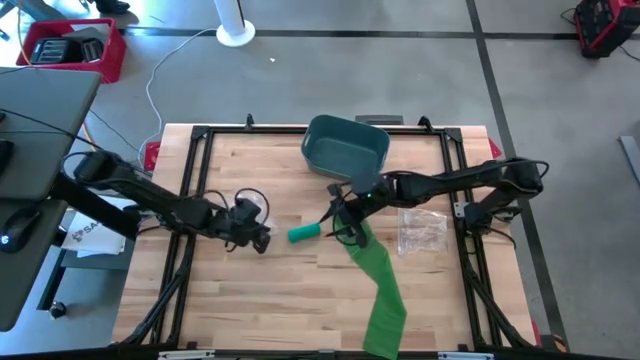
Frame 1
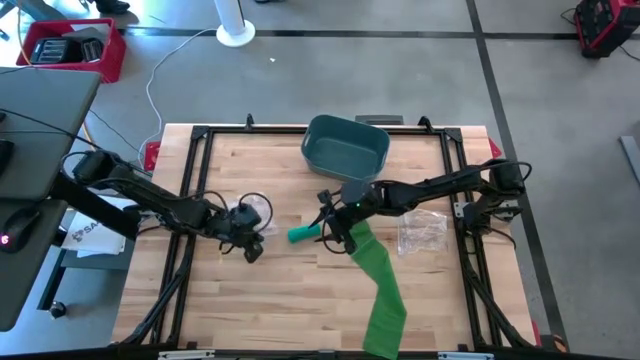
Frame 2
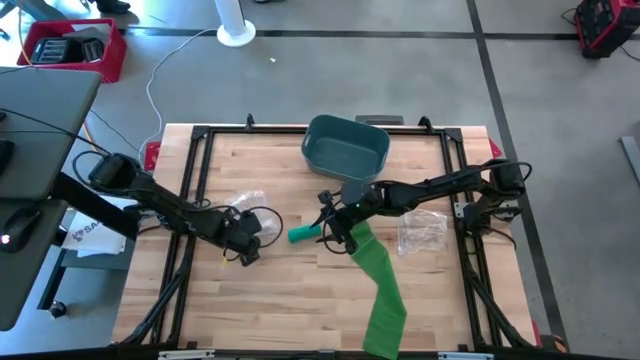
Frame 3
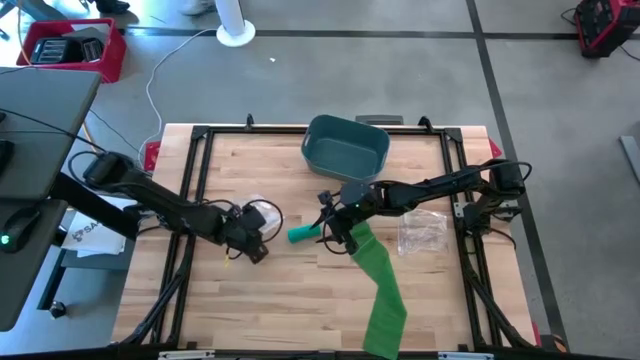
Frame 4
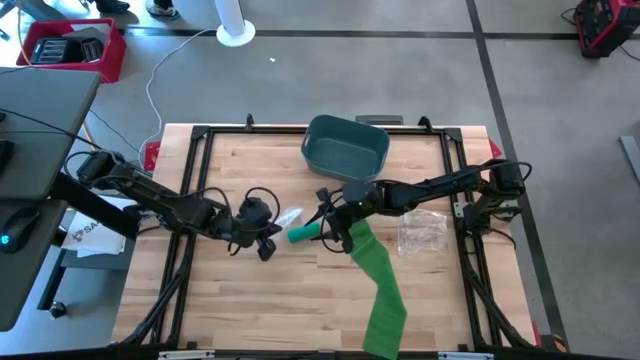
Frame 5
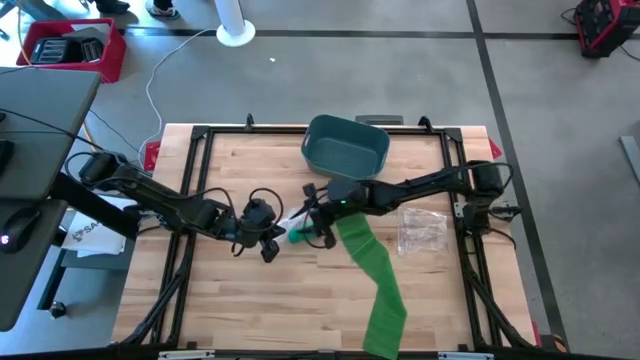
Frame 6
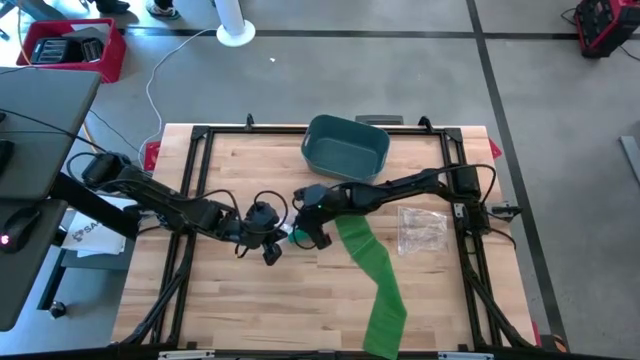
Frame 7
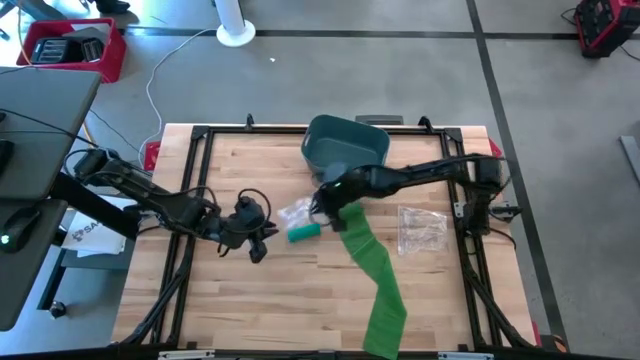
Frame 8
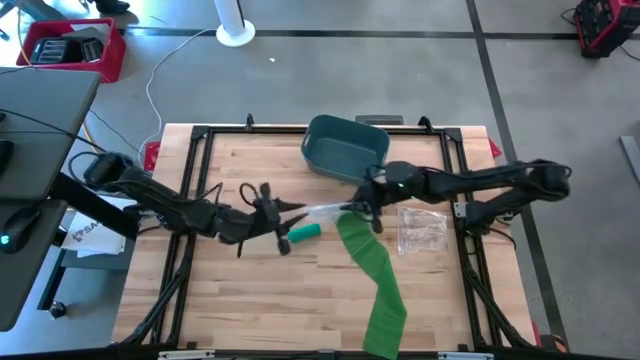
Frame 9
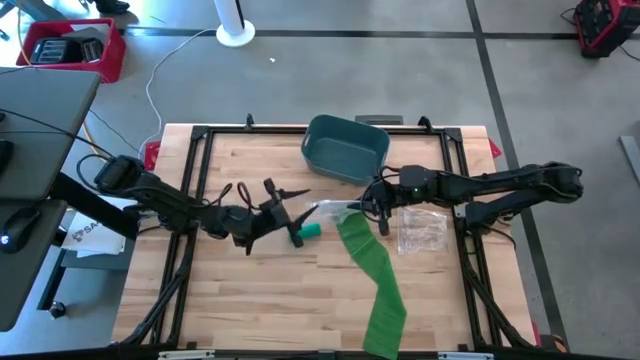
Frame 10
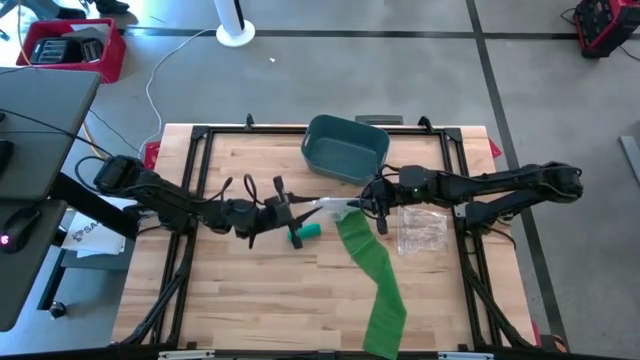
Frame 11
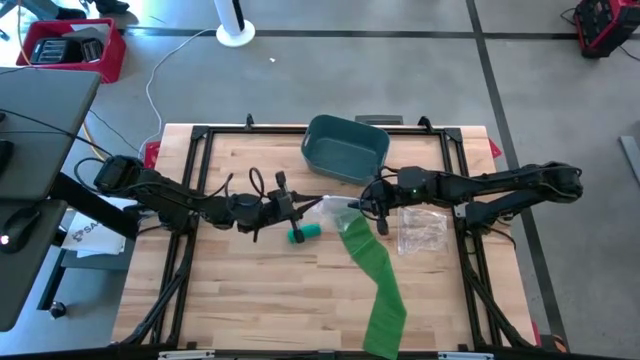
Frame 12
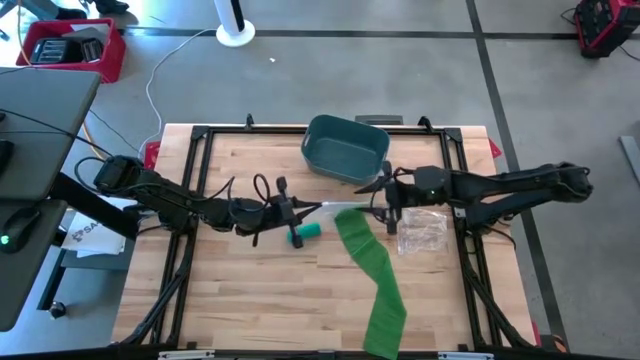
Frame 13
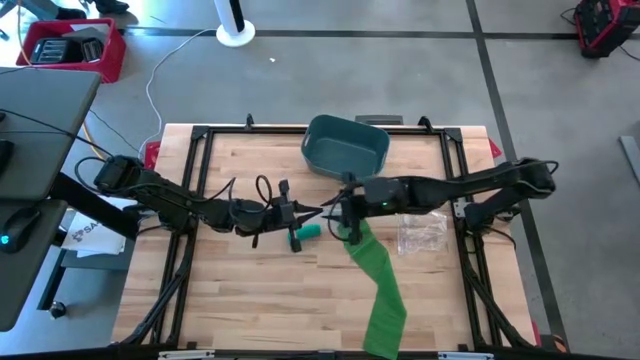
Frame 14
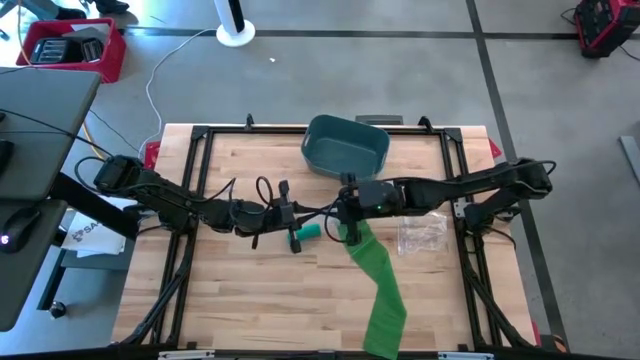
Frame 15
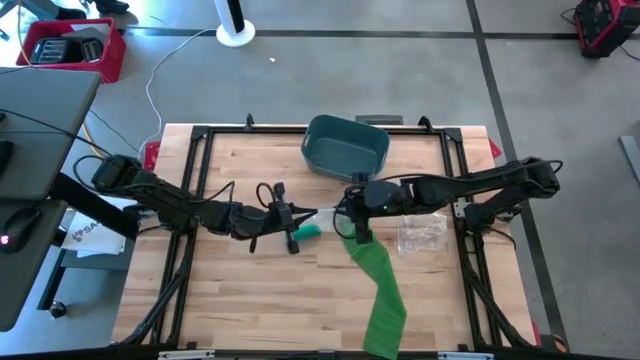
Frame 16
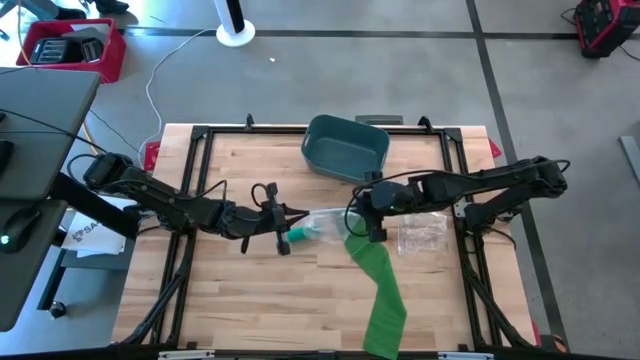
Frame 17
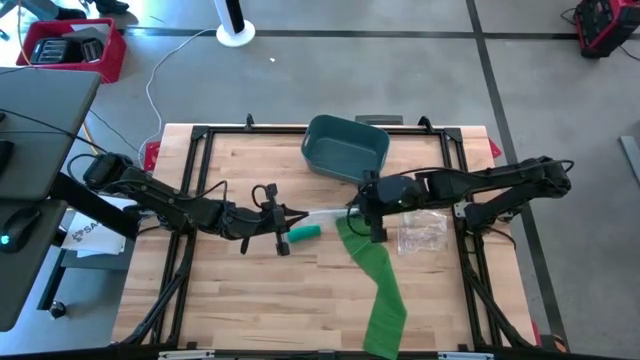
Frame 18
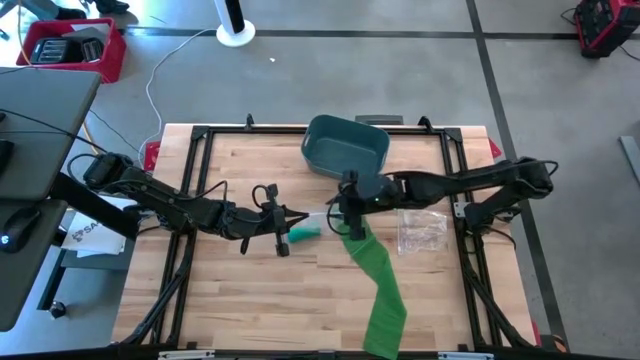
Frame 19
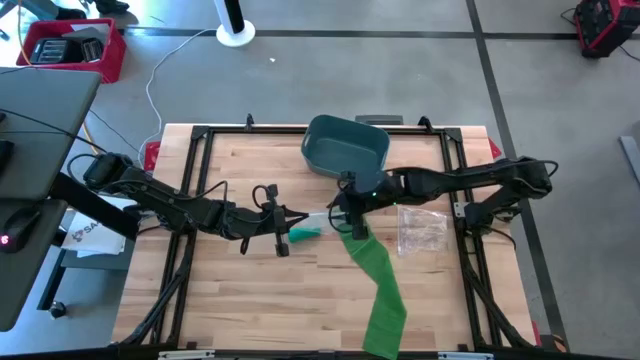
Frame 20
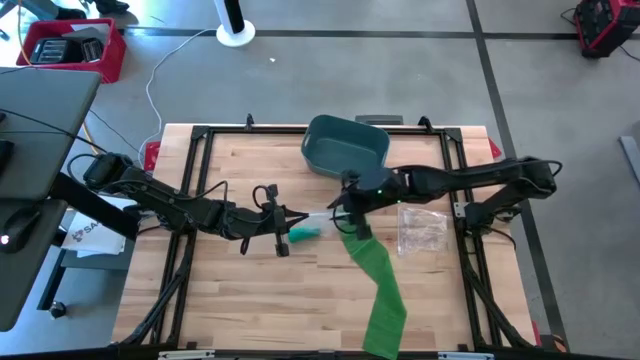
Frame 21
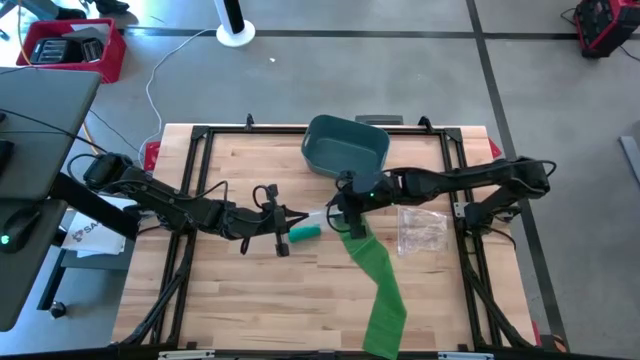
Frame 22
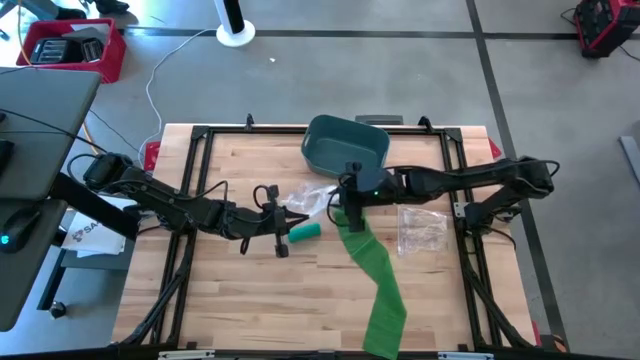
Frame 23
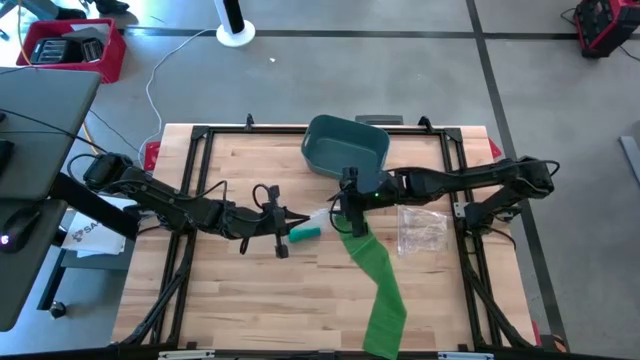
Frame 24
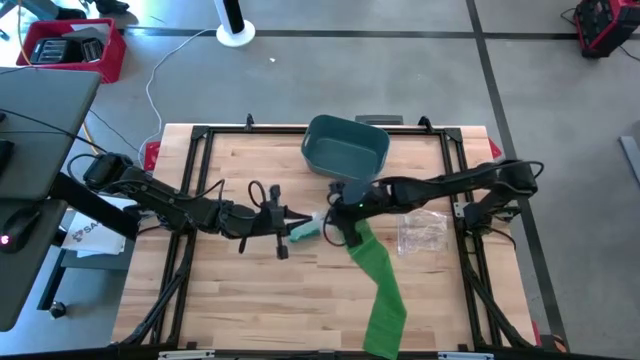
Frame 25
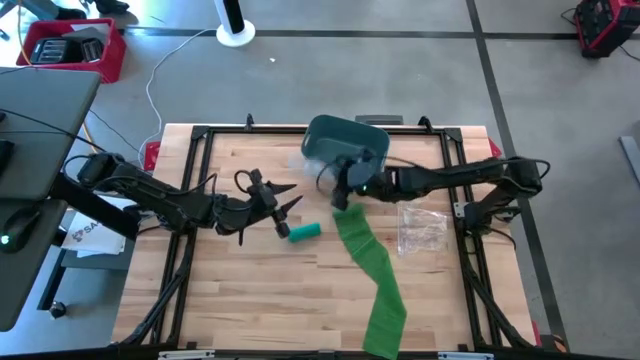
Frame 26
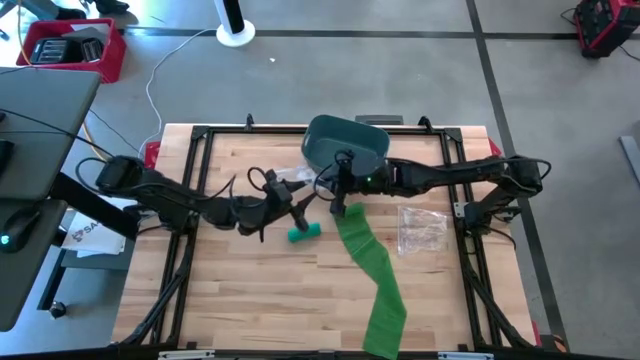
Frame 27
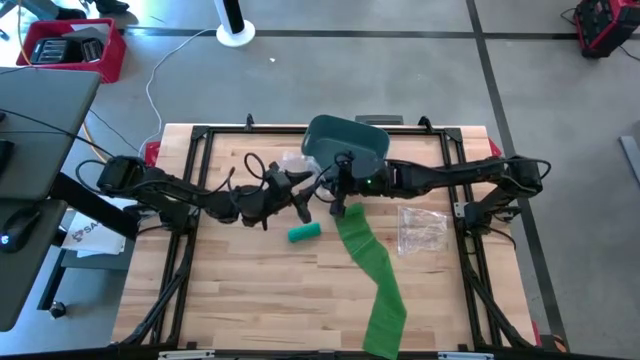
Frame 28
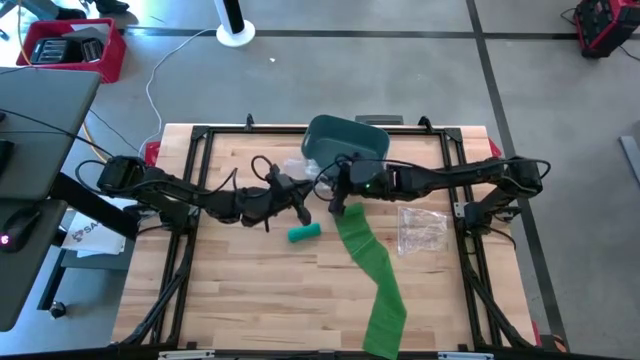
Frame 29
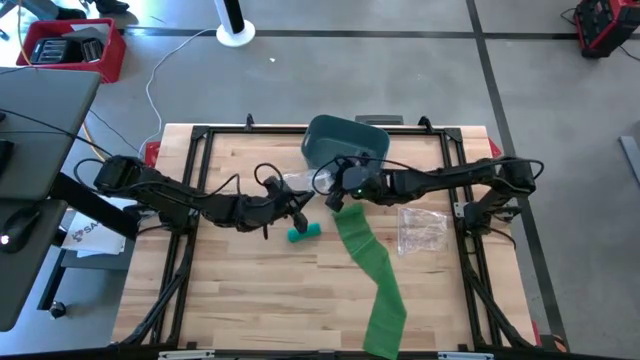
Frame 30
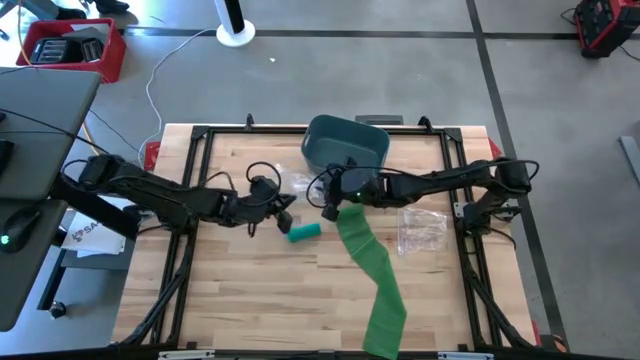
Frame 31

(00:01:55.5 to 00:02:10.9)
Task: Roll bandage
Open the left transparent zip bag

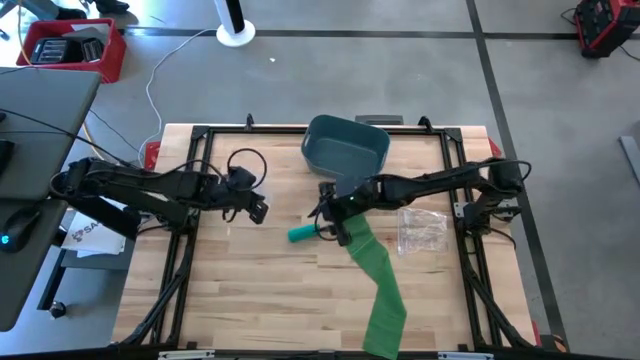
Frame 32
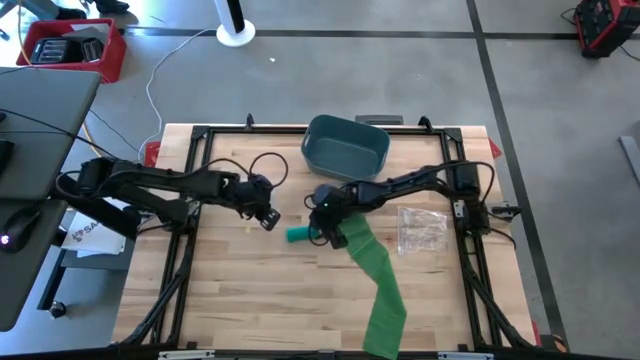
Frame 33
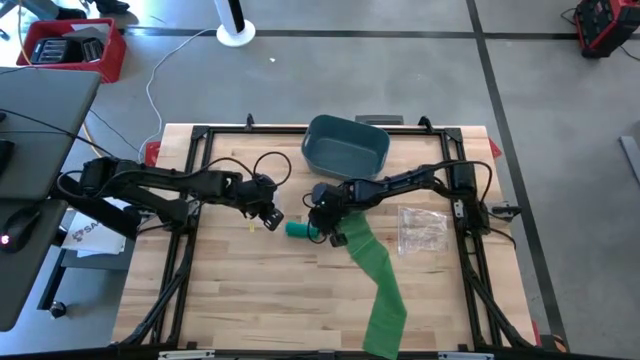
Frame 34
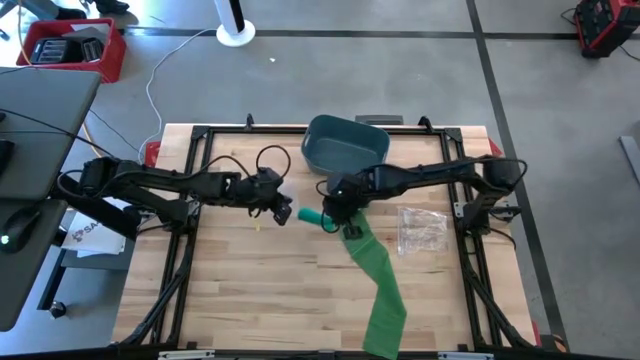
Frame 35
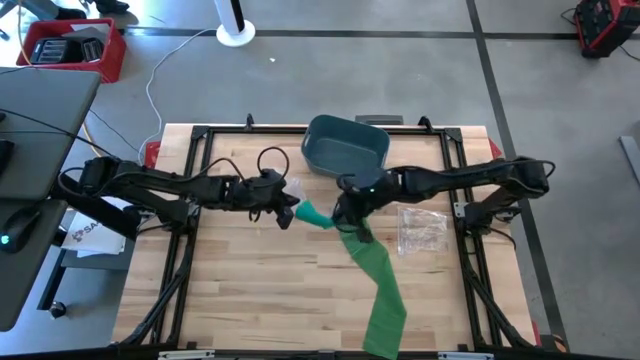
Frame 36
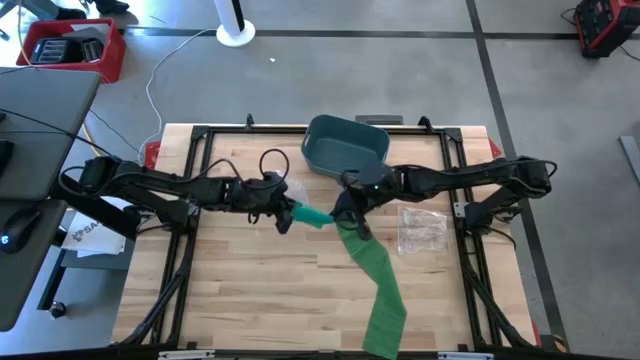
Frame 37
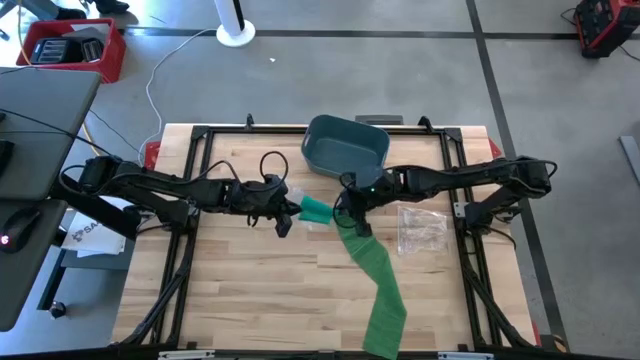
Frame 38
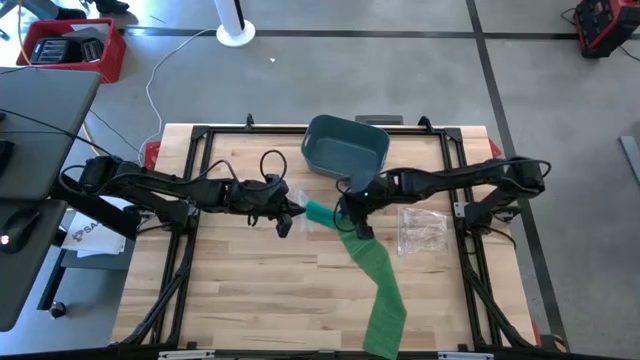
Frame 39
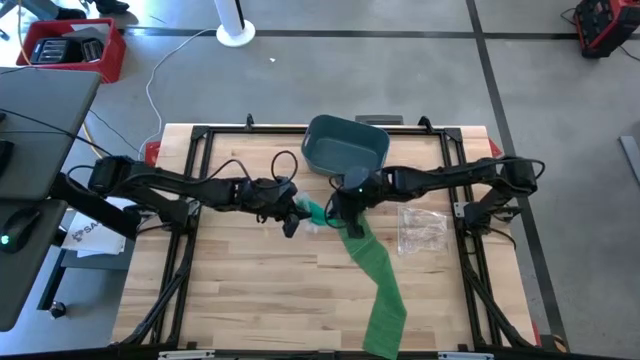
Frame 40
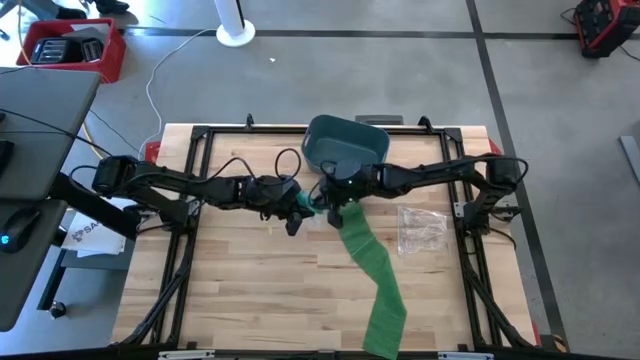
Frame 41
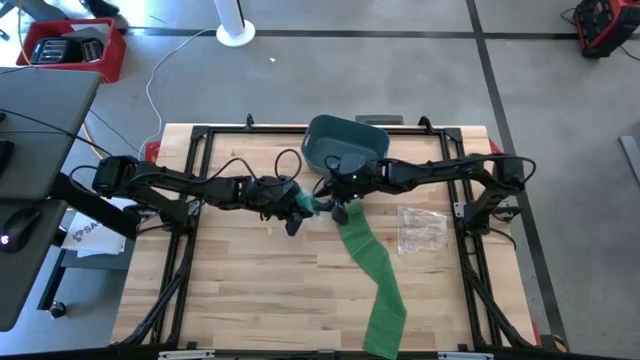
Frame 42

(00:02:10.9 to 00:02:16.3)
Put the light green bandage into the left transparent zip bag
